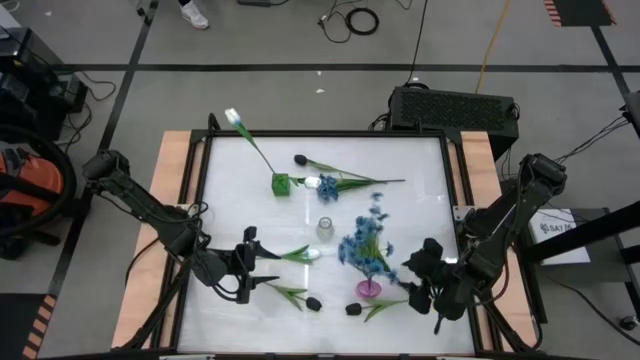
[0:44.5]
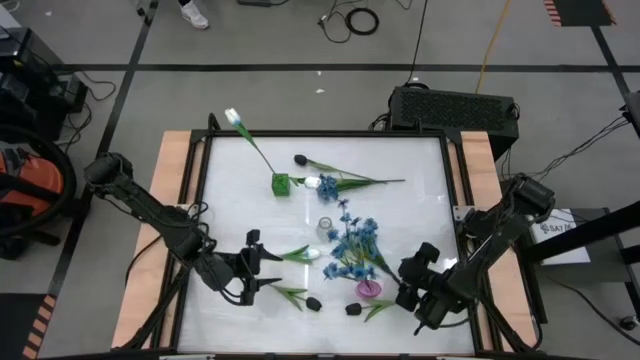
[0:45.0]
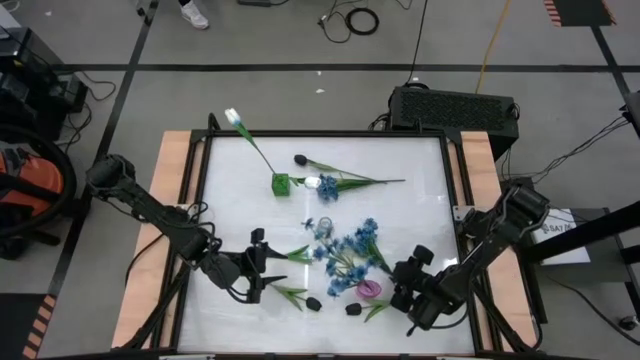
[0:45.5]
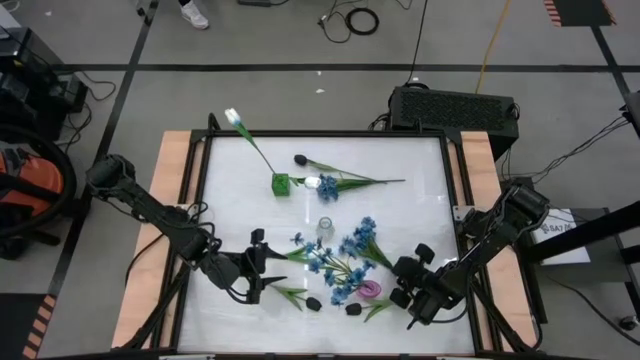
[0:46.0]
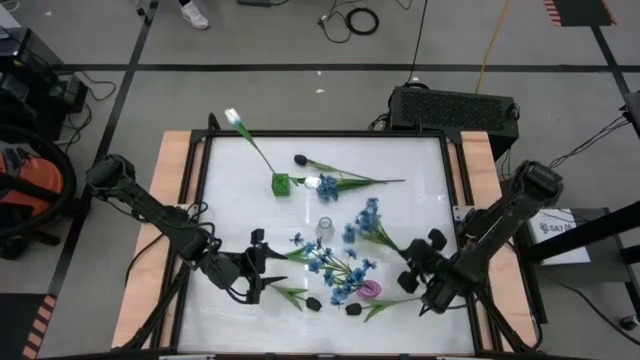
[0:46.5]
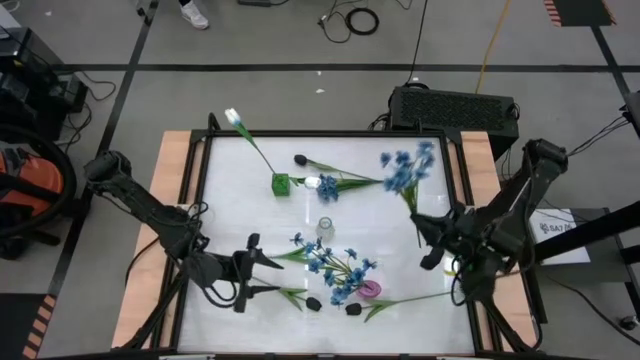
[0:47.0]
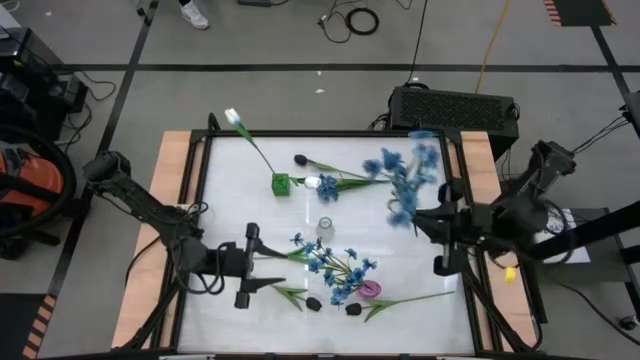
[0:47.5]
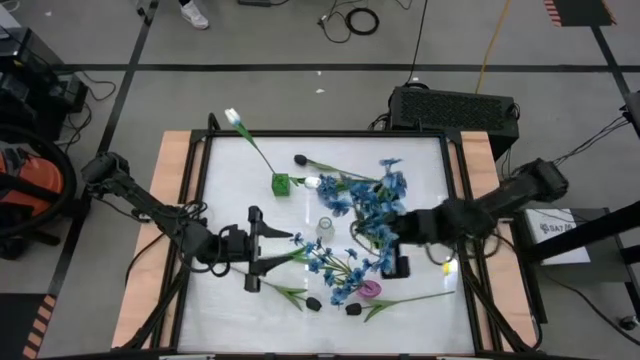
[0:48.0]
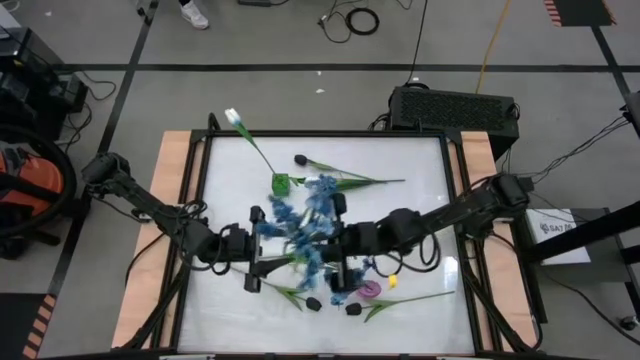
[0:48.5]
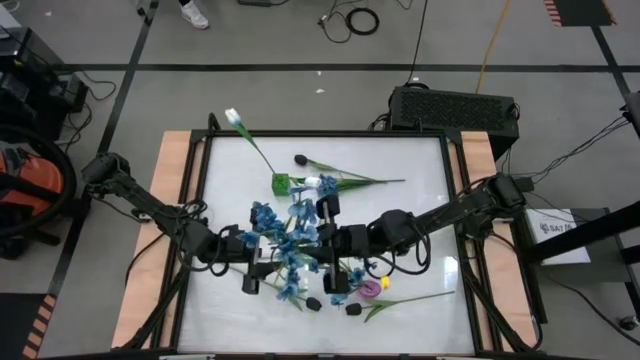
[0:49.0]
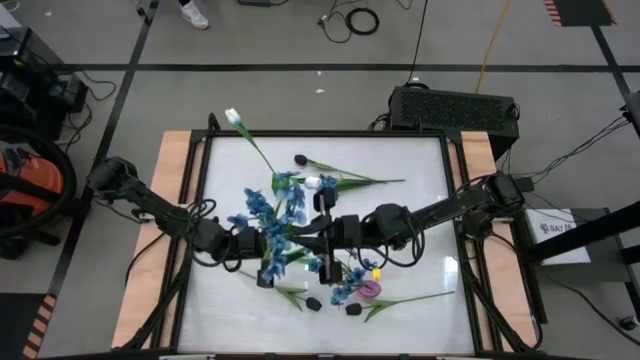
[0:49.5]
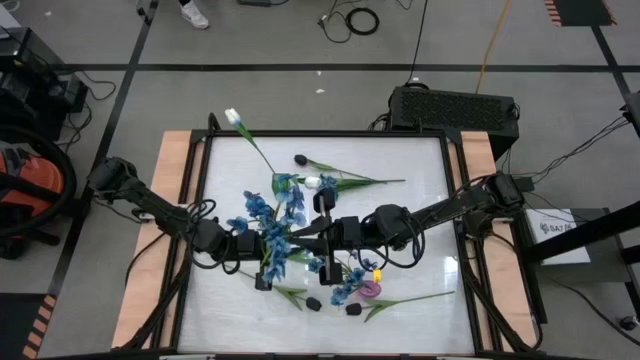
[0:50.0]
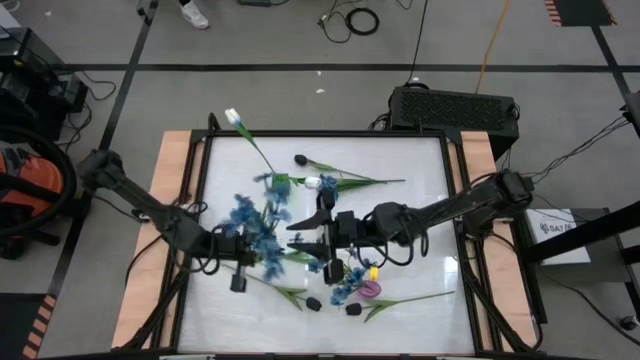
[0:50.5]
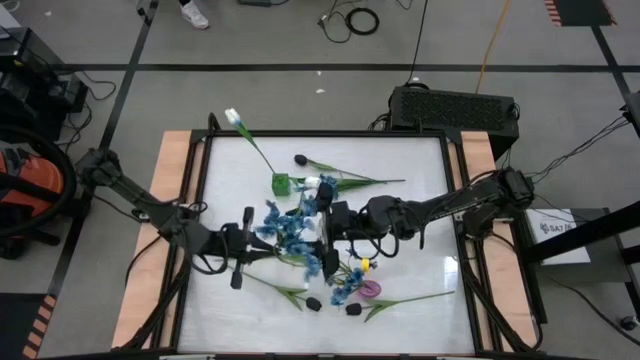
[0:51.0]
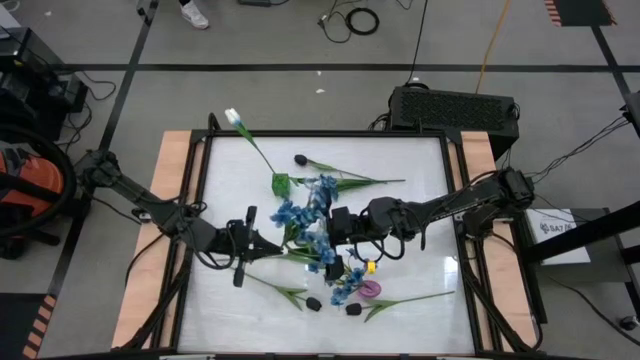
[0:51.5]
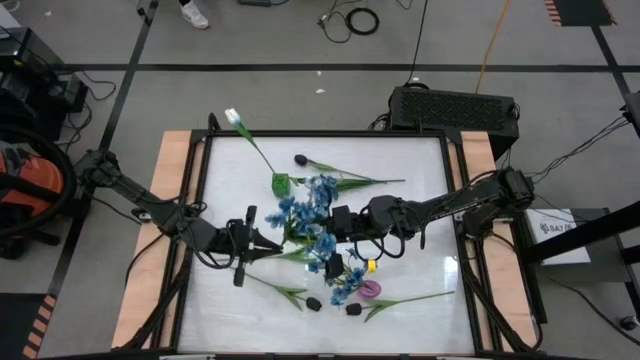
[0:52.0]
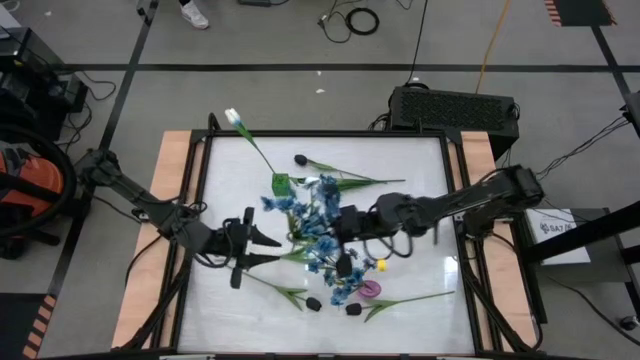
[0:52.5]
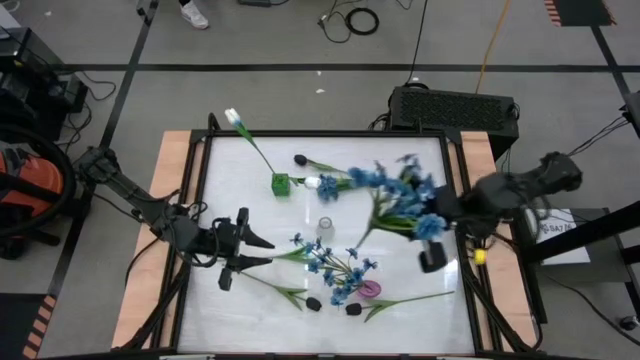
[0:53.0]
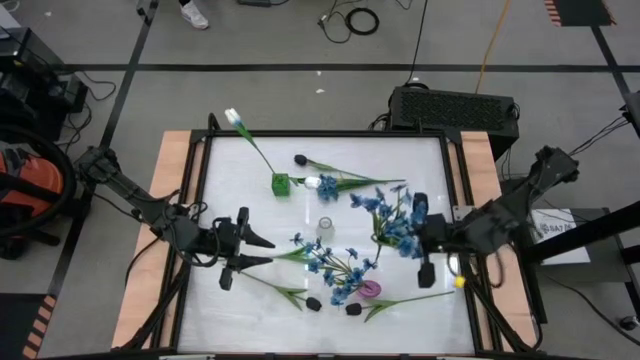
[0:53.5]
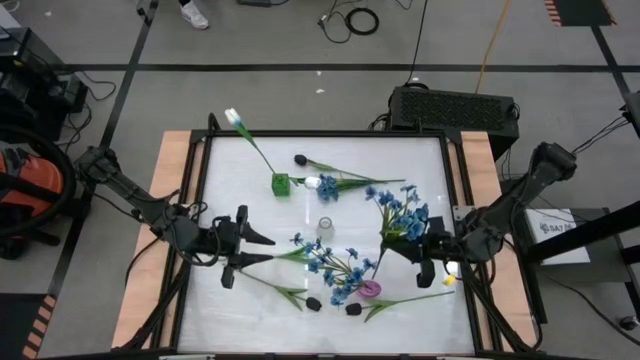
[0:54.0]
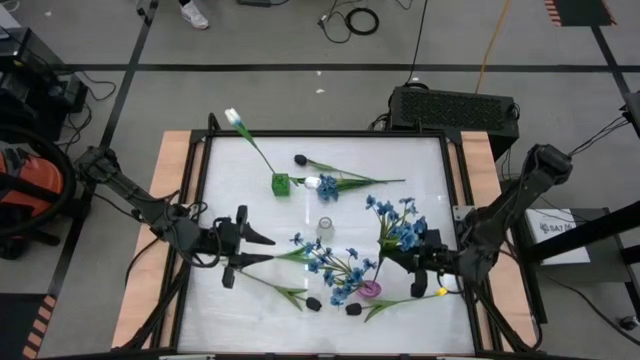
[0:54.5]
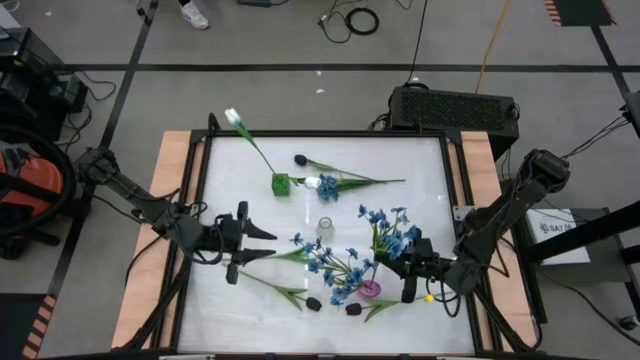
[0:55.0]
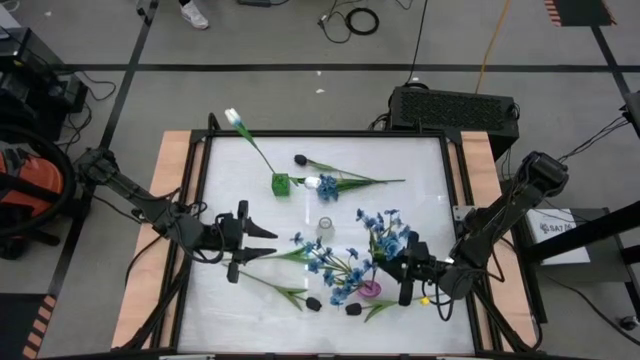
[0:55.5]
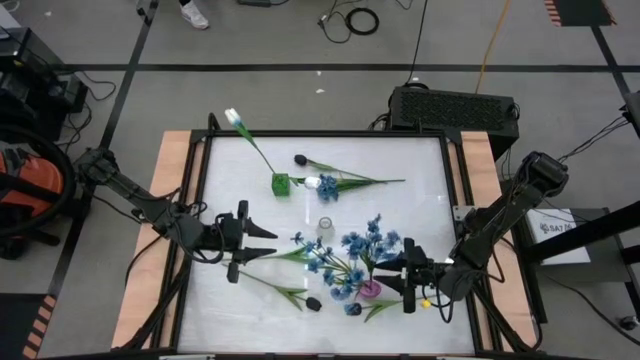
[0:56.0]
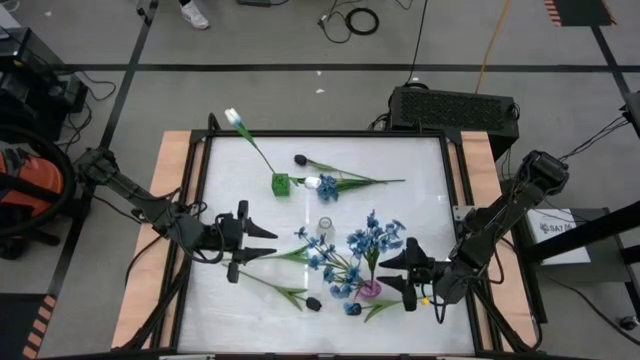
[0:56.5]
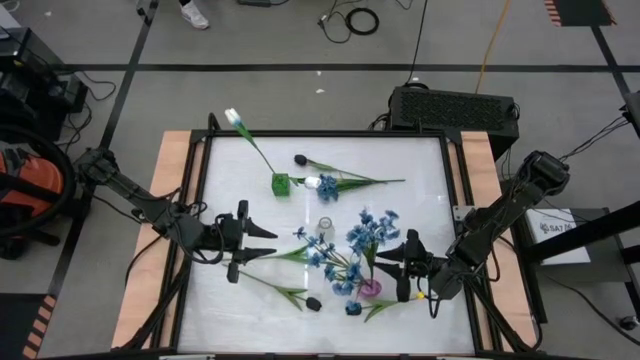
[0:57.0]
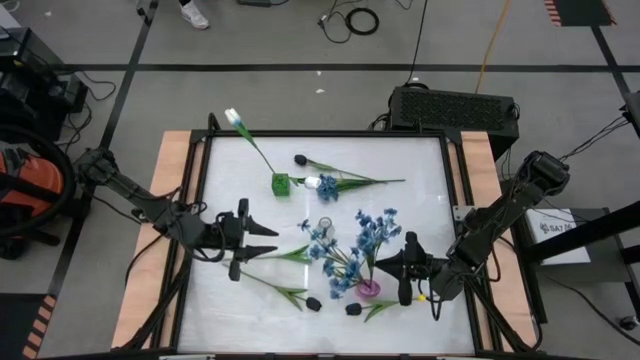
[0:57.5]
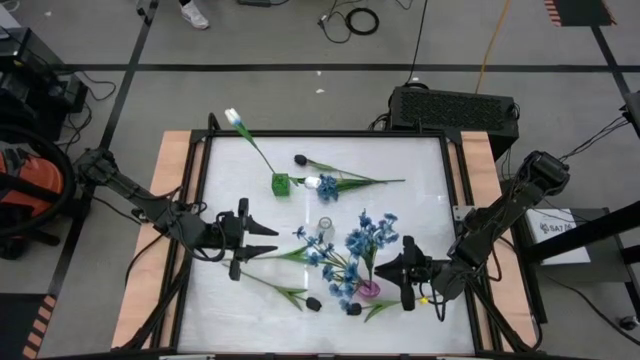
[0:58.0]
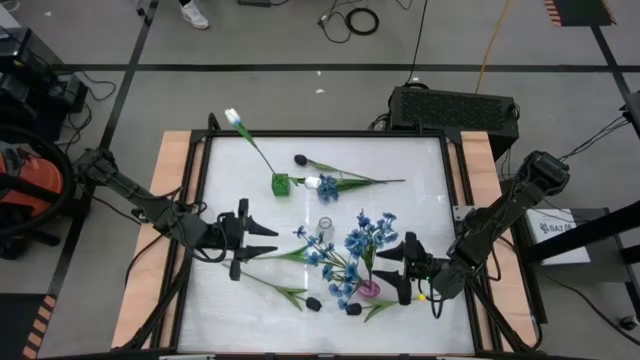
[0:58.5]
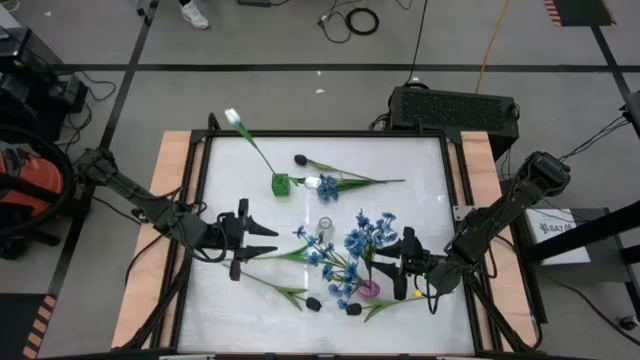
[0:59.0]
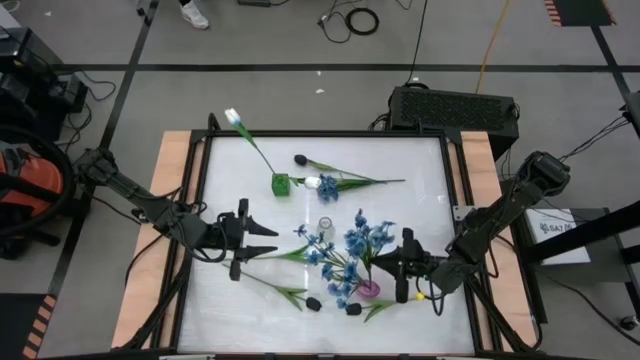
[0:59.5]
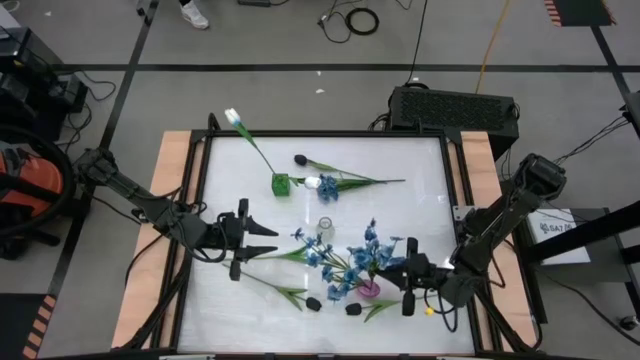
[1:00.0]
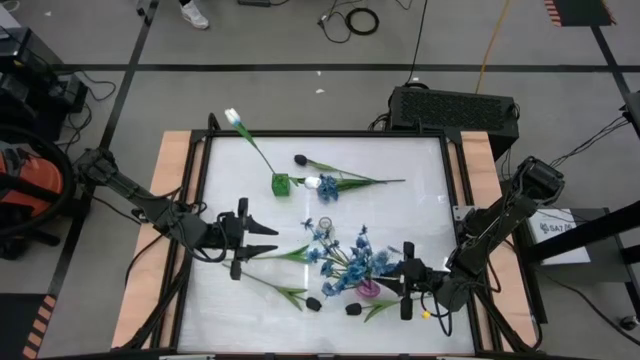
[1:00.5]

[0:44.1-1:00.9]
Task: Sort flowers into vase by color
Put the bottom blue flowers into the purple vase

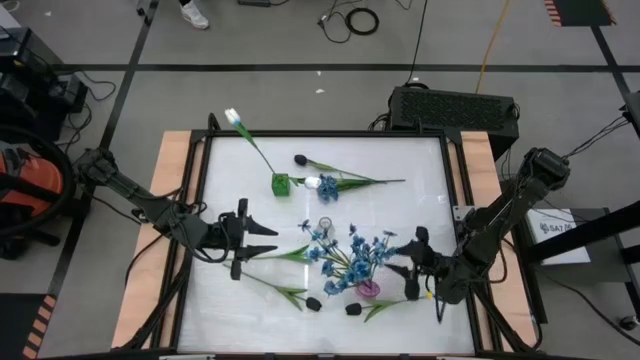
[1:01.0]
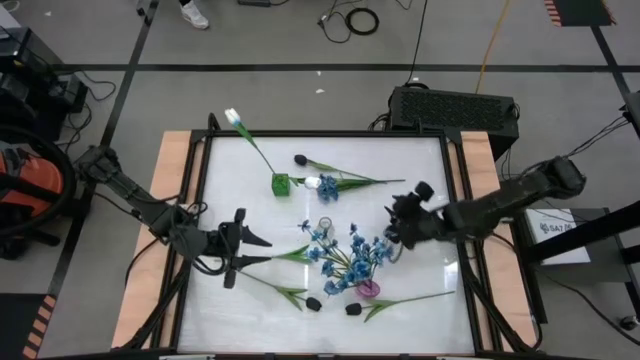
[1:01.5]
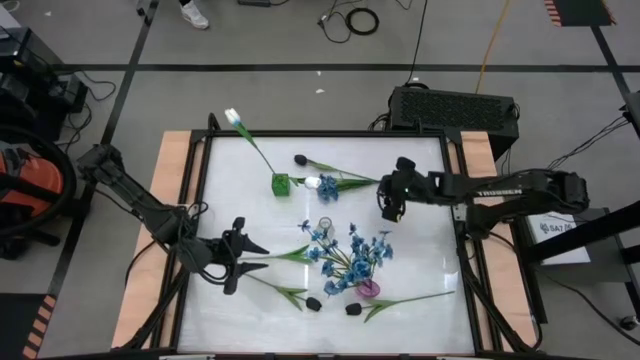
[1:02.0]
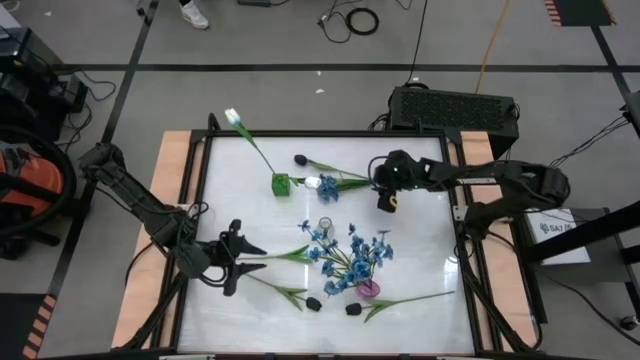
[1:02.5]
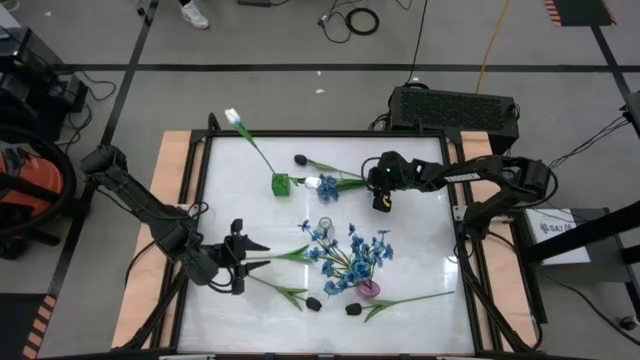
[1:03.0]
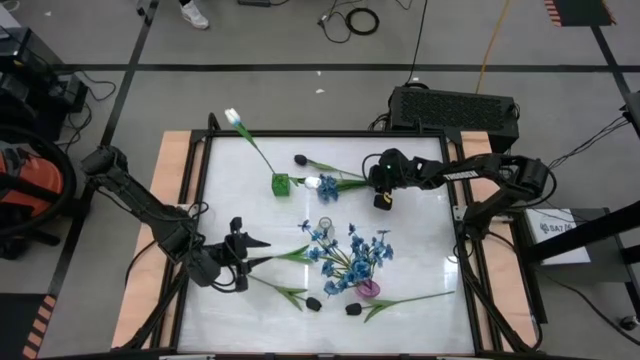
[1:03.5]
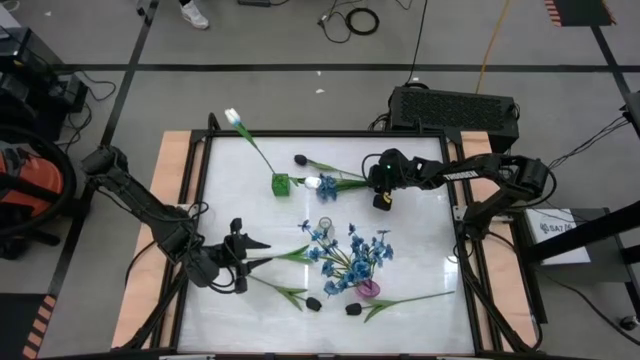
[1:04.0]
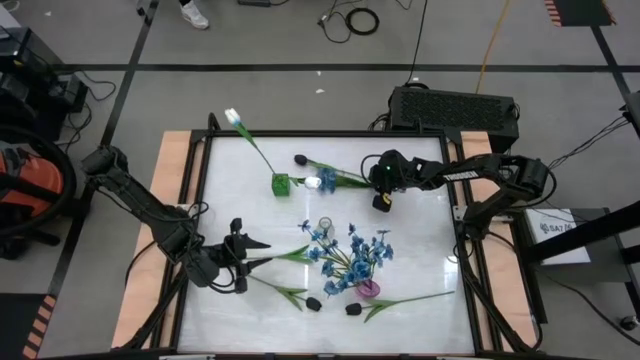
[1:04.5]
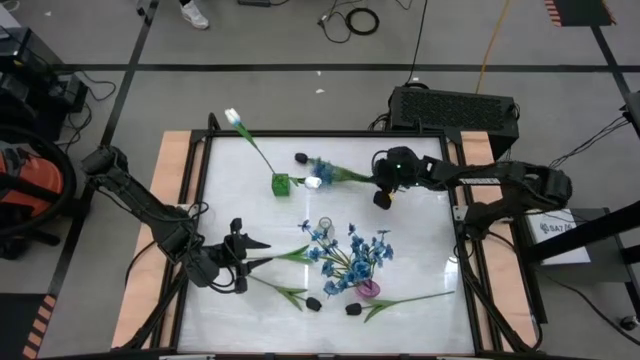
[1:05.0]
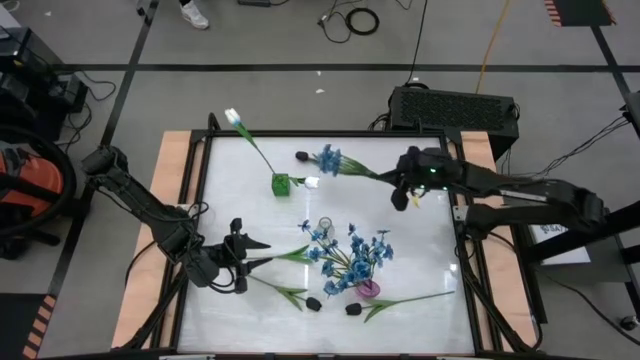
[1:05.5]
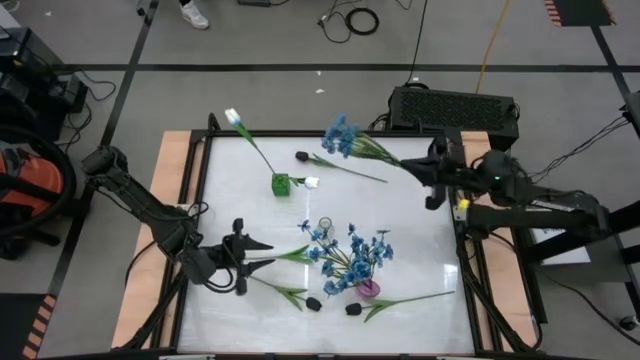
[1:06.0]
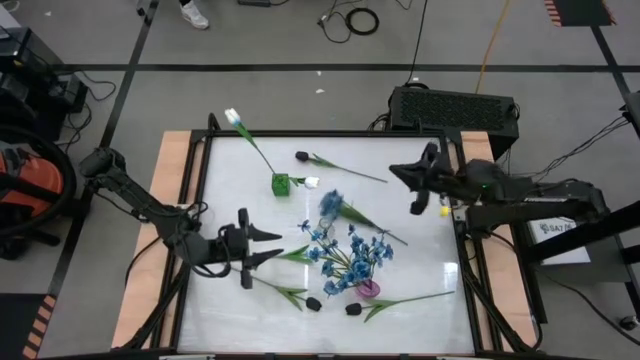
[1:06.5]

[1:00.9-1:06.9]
Put the blue flowers into the purple vase
